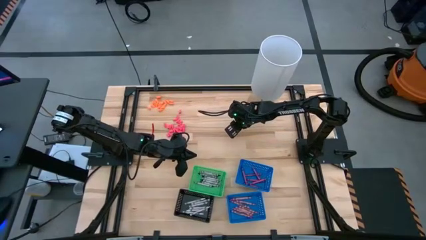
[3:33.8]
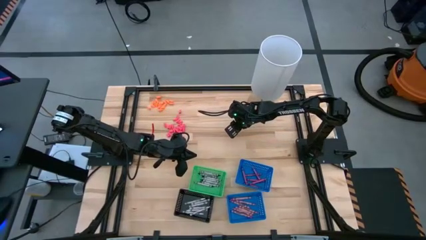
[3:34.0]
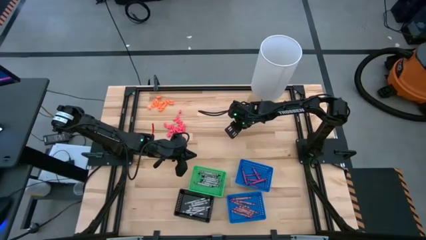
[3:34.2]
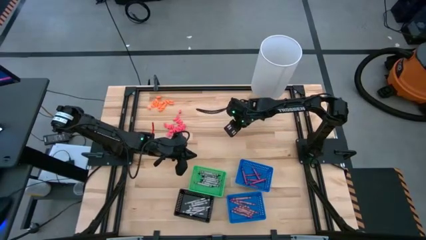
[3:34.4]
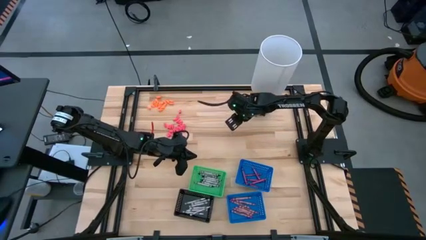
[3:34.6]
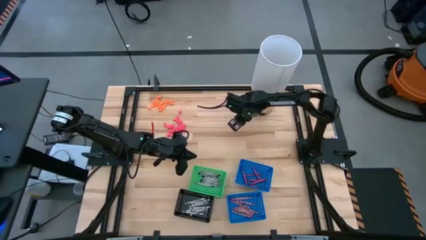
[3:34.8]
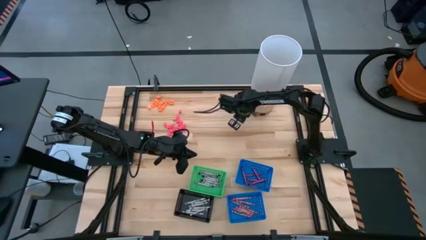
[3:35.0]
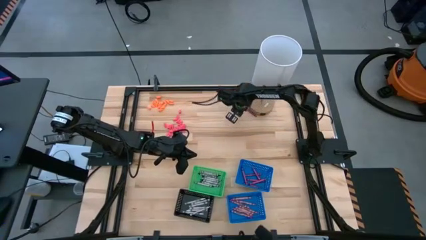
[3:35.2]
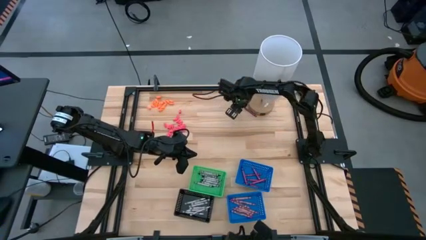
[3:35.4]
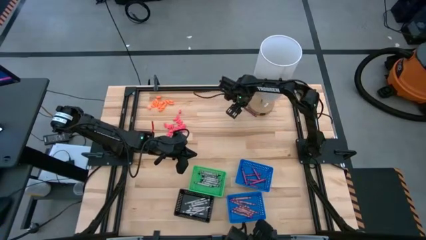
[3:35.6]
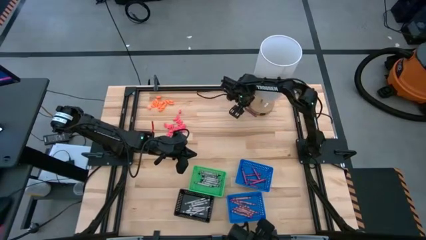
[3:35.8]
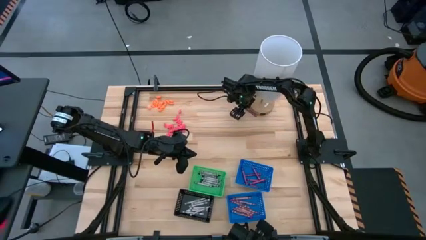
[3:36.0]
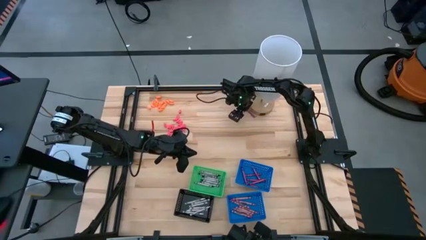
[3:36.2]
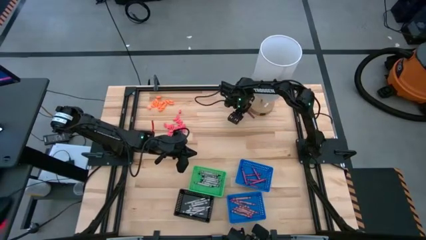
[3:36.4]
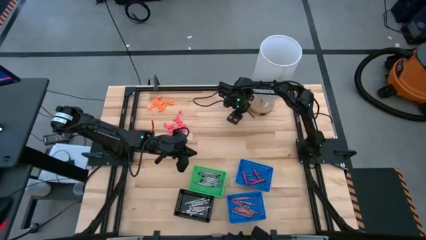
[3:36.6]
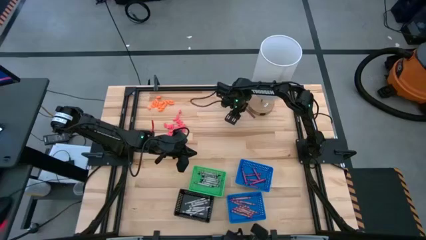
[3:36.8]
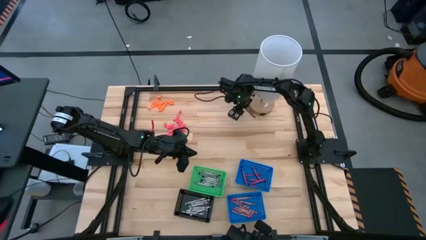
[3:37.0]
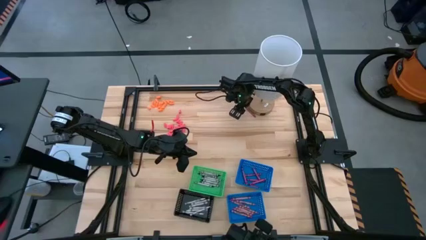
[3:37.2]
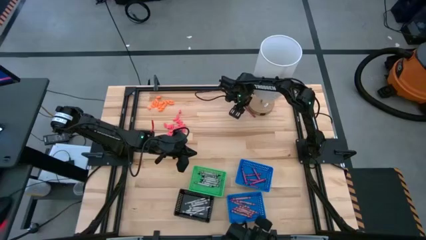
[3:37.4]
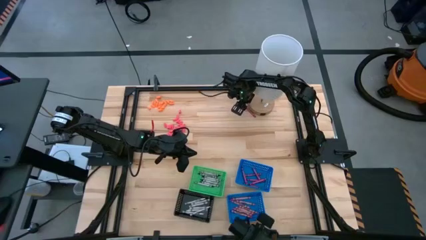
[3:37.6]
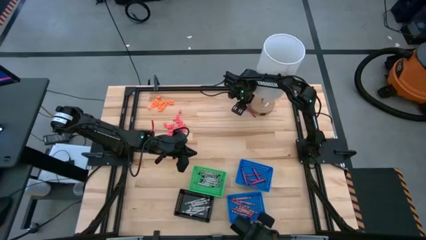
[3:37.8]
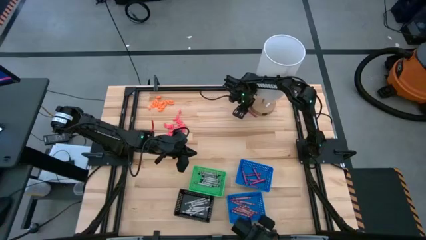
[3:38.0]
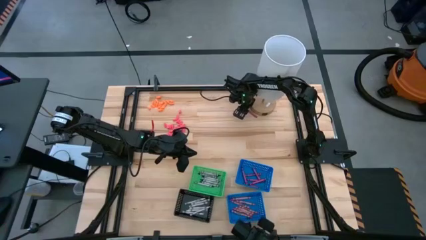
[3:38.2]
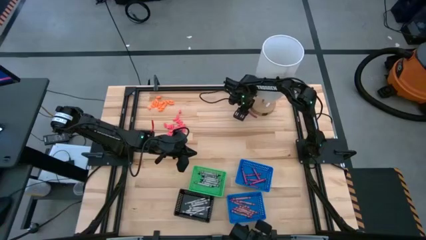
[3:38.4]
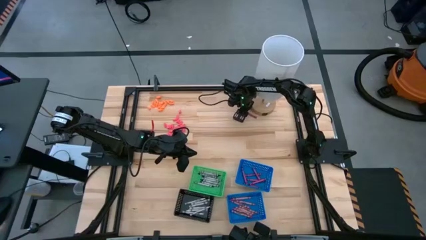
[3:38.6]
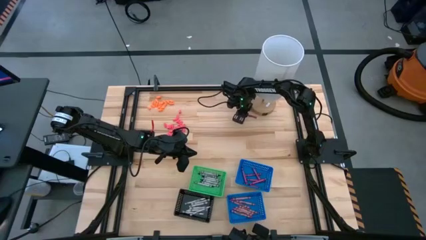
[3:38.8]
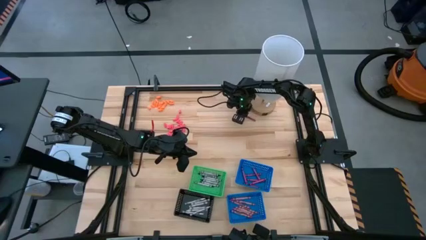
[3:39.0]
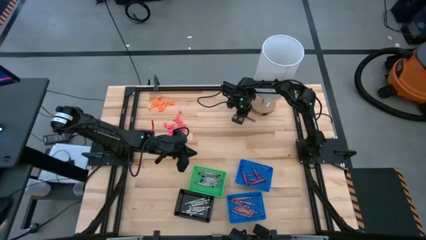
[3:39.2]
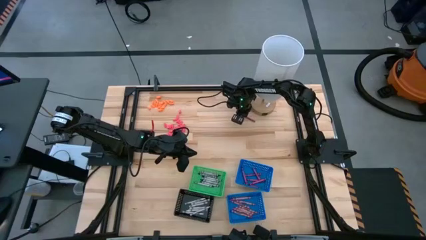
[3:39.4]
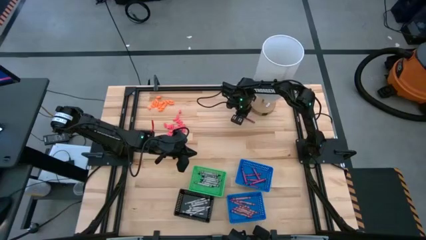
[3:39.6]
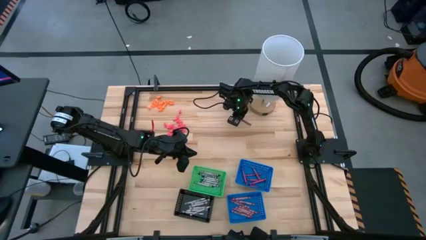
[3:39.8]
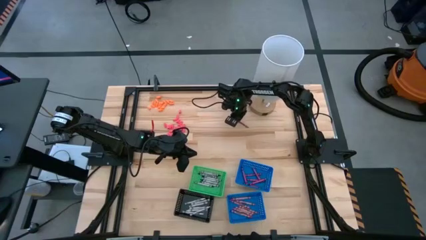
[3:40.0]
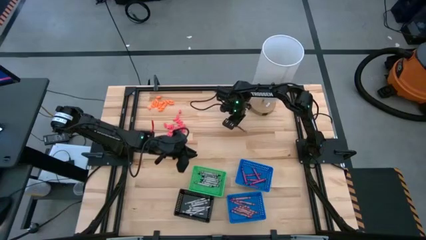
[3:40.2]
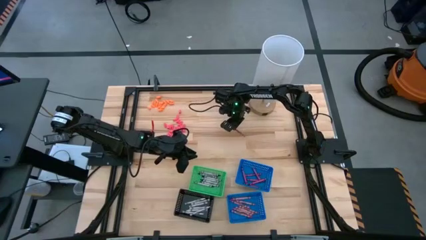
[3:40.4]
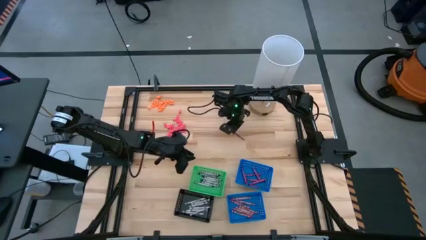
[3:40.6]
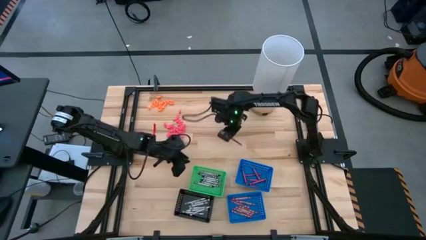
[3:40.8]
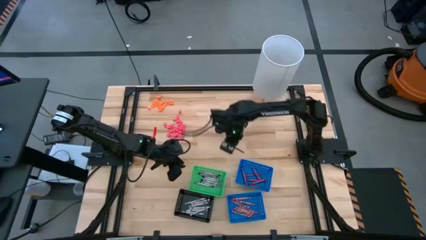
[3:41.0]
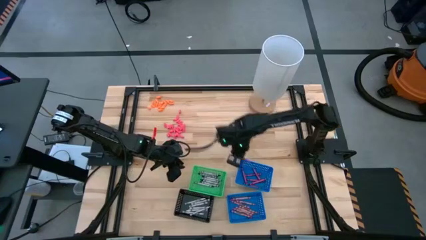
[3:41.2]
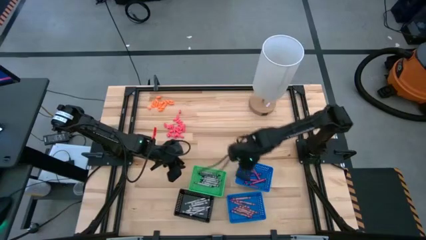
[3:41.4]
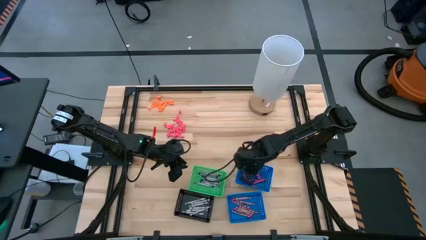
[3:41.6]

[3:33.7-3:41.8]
Task: Sort crayons
Put the violet crayon into the top blue bin

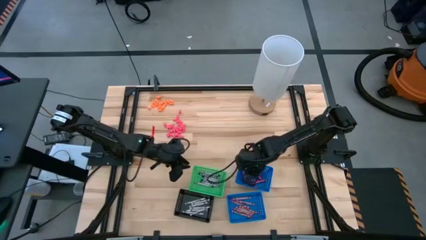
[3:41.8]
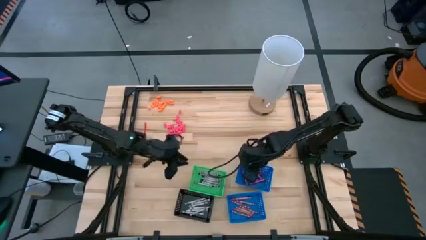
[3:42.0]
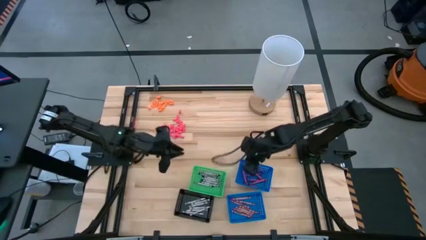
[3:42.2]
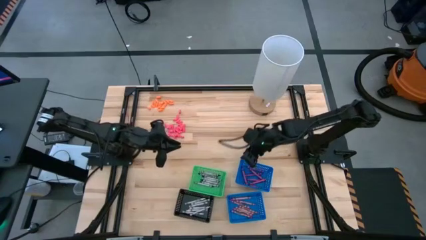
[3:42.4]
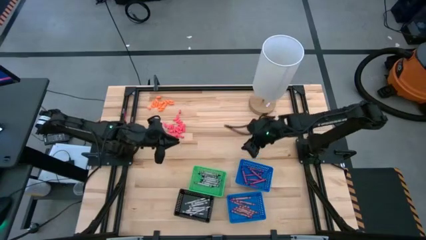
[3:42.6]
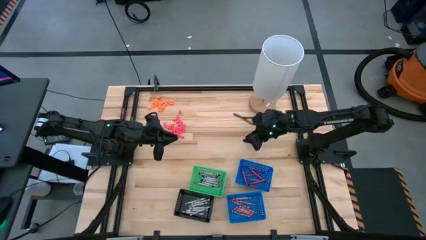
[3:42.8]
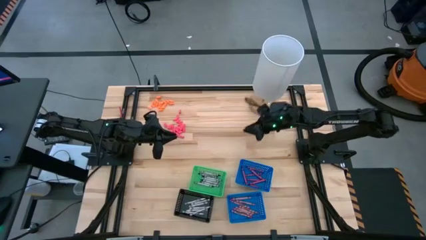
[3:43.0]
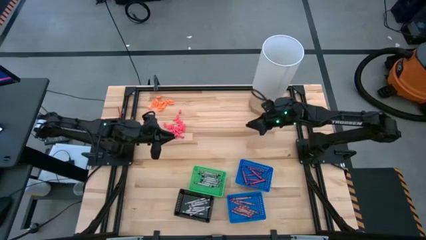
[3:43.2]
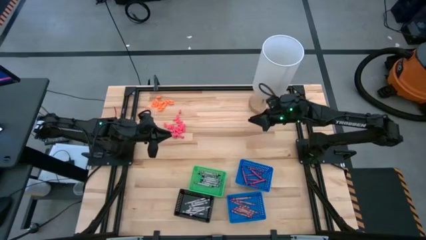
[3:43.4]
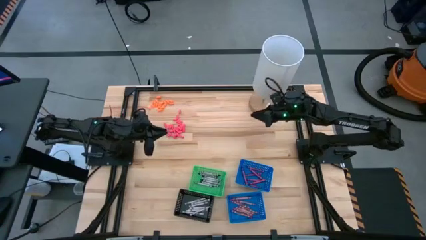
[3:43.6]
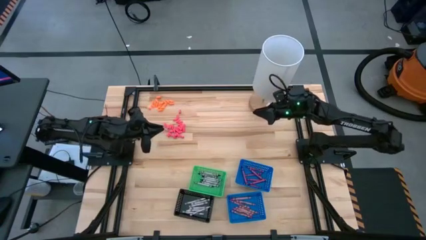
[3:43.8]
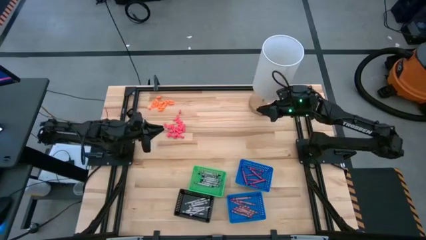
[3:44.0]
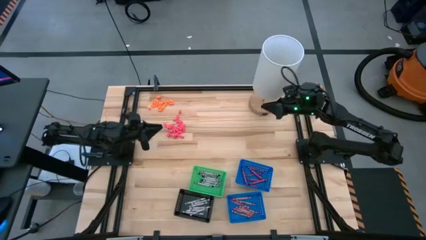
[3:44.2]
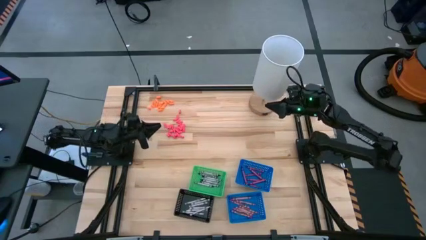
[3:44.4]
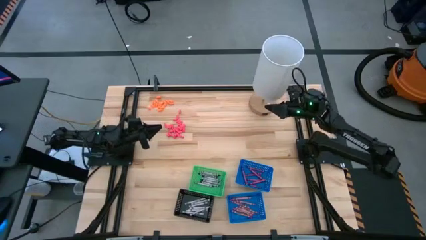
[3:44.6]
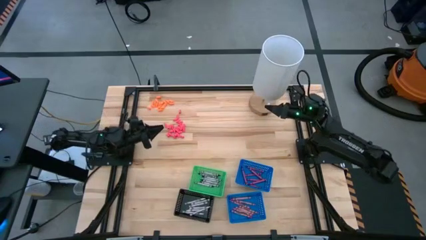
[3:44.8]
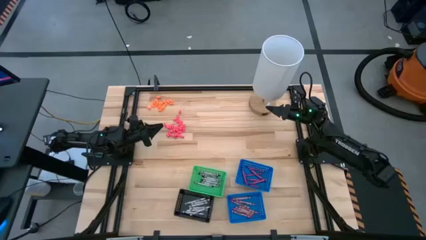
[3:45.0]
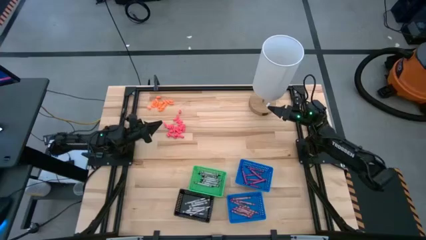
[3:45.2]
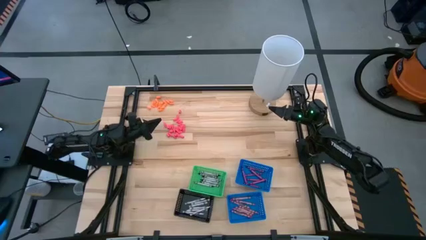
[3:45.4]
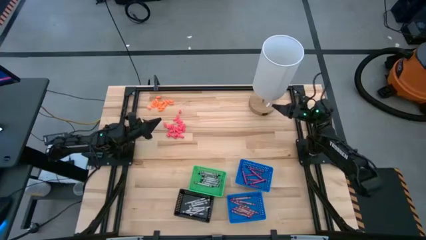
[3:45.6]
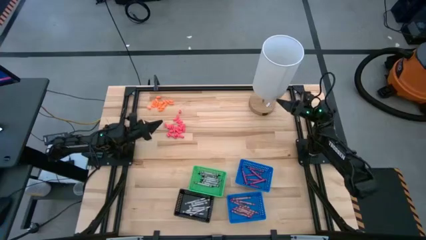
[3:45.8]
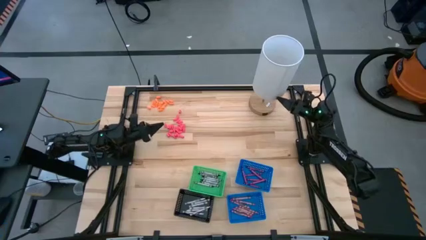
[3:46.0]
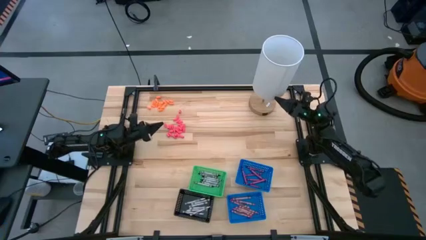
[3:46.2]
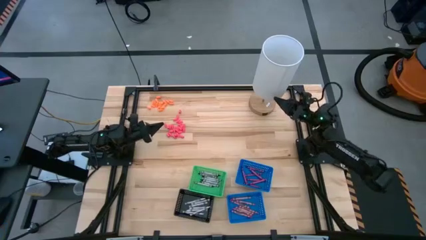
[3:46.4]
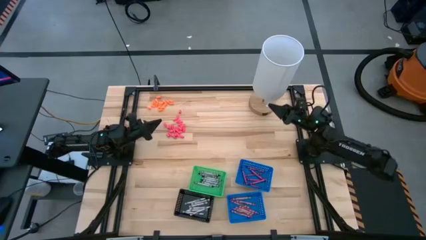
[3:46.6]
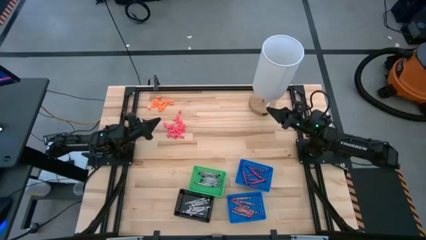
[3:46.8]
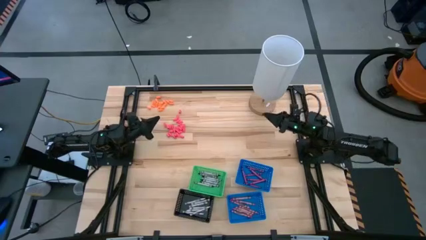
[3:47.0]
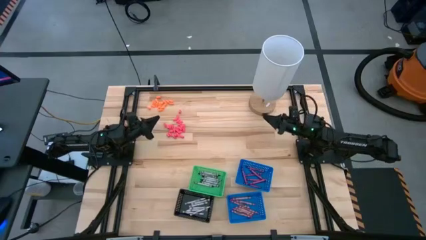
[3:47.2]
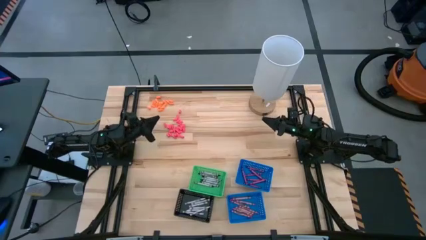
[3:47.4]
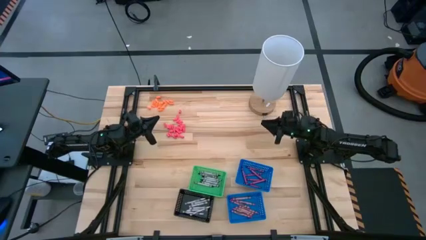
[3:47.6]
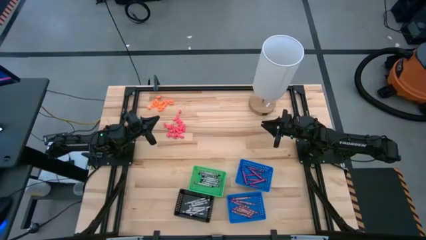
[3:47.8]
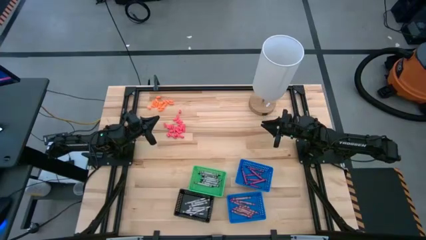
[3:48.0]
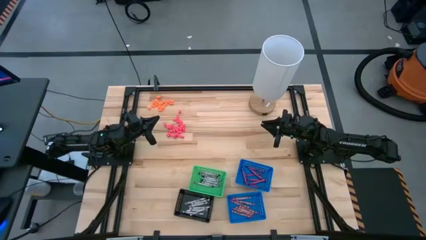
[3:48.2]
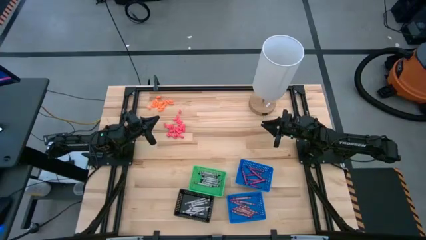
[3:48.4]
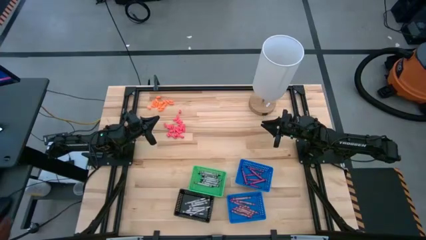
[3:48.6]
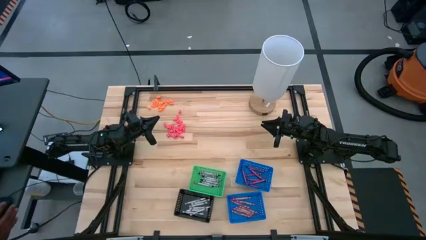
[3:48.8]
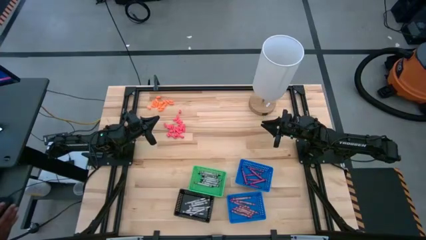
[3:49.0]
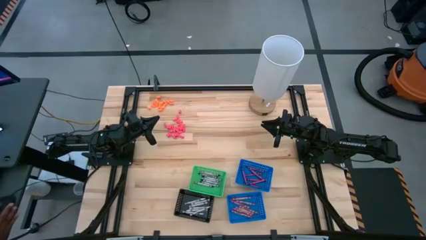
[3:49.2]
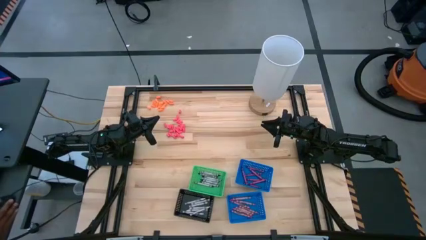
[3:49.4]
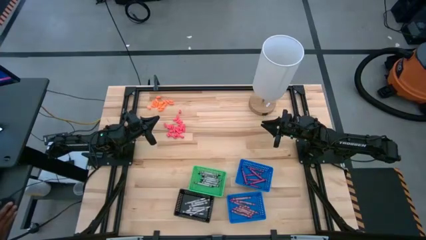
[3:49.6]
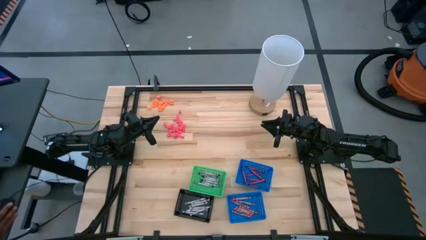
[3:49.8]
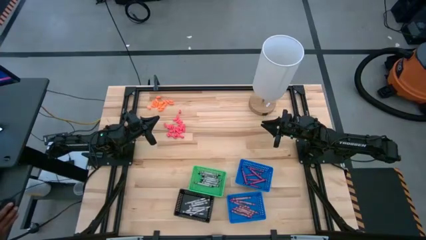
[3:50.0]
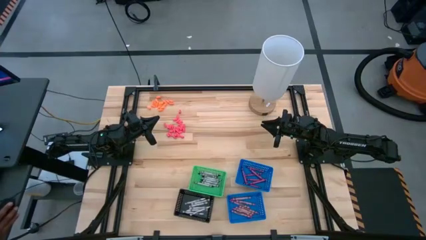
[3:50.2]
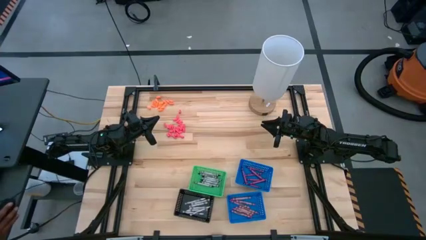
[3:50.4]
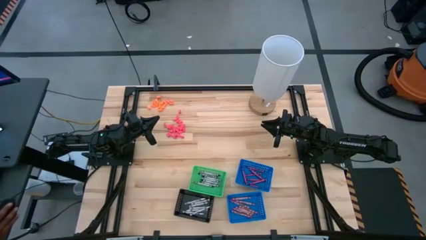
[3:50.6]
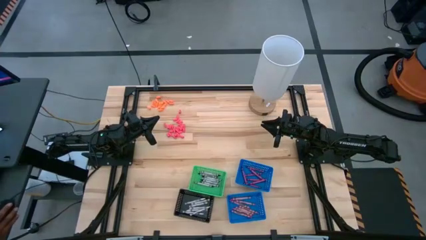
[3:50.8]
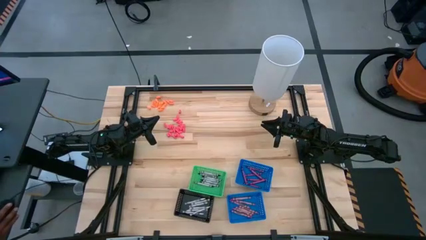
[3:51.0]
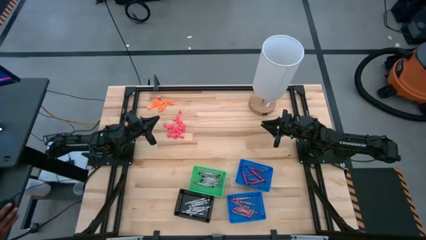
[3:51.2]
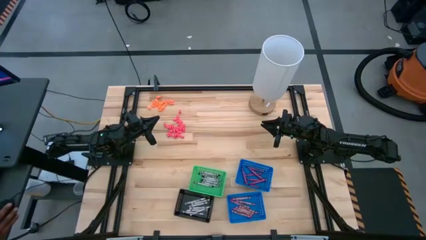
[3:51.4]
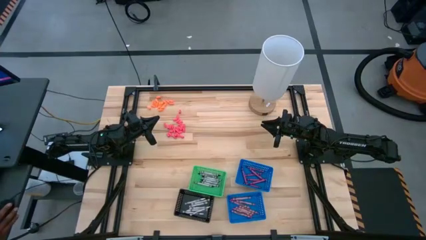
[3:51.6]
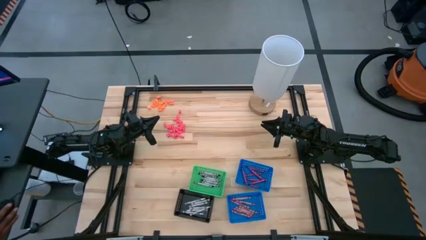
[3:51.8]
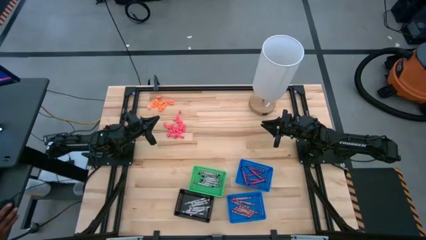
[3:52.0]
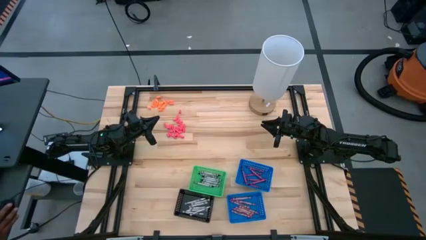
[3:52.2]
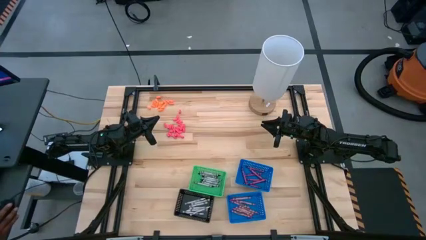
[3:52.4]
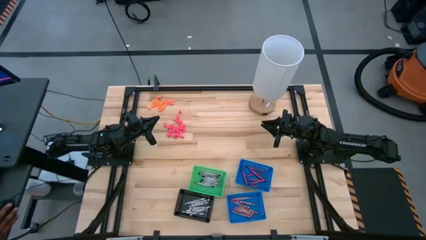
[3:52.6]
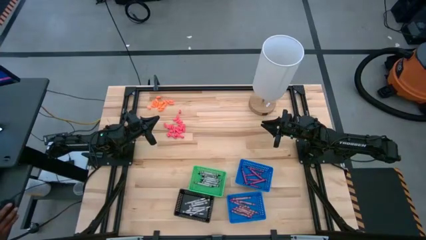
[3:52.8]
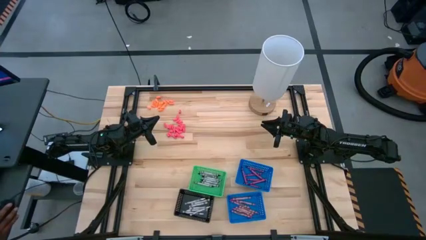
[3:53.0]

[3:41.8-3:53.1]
Return to Home Position
